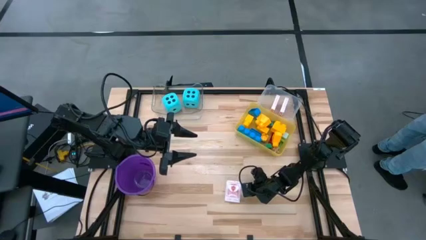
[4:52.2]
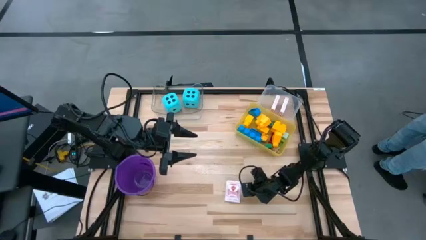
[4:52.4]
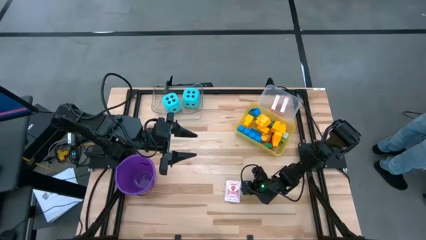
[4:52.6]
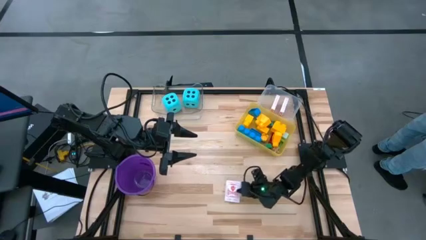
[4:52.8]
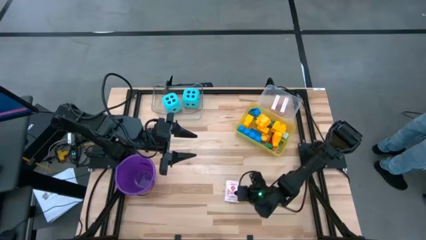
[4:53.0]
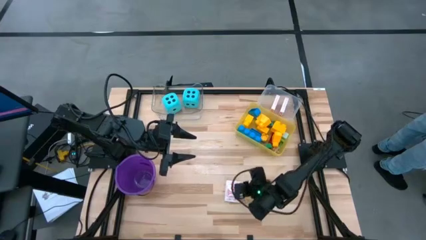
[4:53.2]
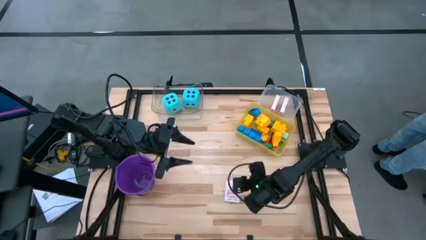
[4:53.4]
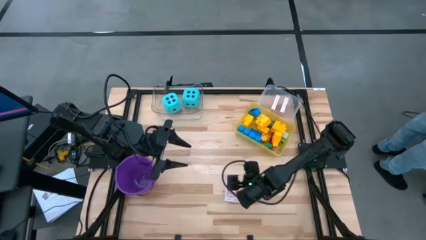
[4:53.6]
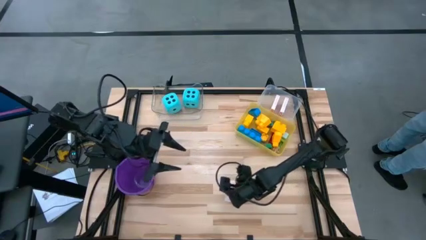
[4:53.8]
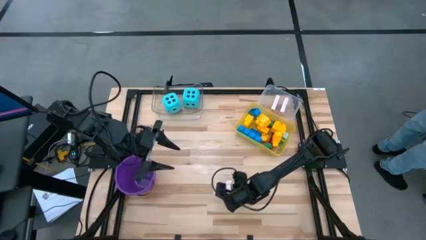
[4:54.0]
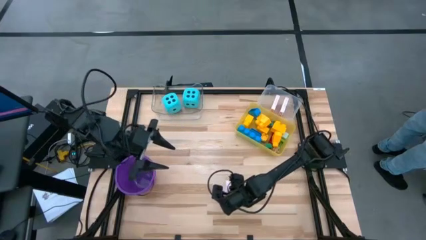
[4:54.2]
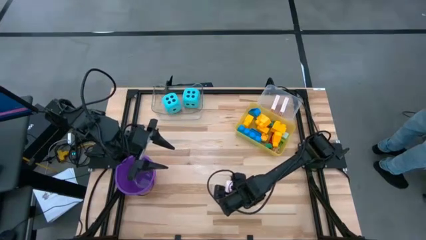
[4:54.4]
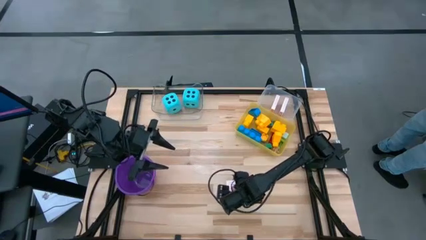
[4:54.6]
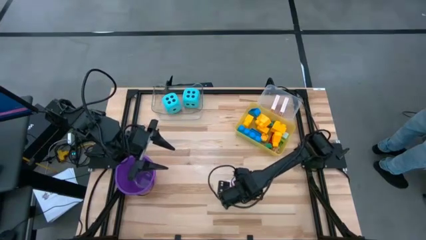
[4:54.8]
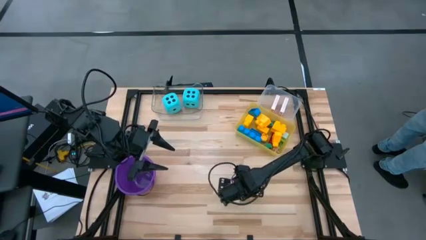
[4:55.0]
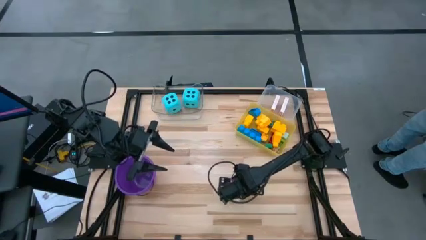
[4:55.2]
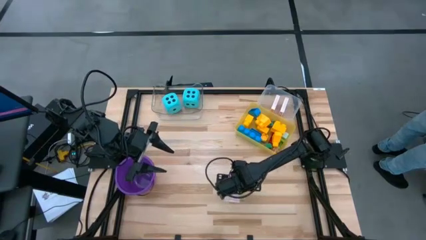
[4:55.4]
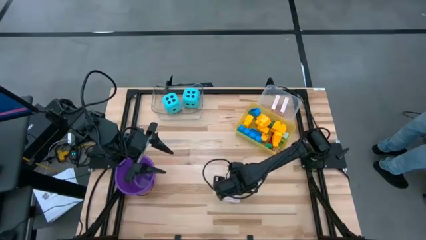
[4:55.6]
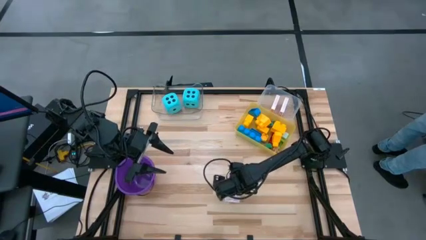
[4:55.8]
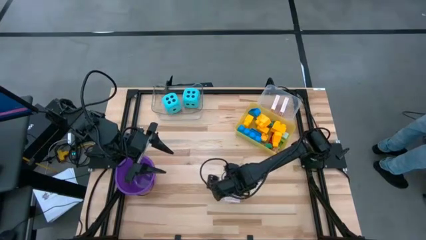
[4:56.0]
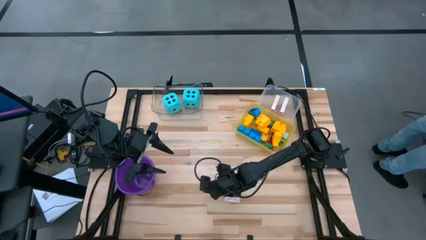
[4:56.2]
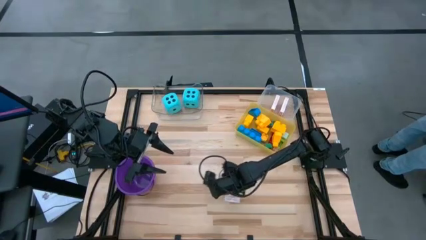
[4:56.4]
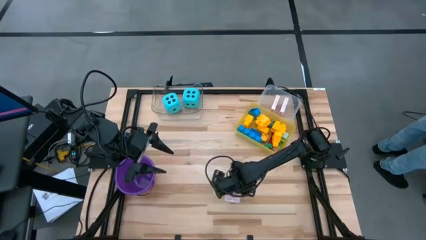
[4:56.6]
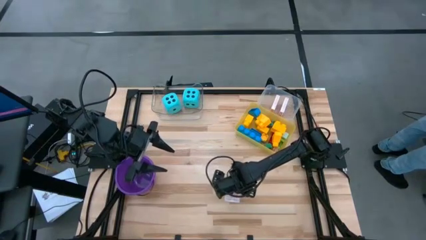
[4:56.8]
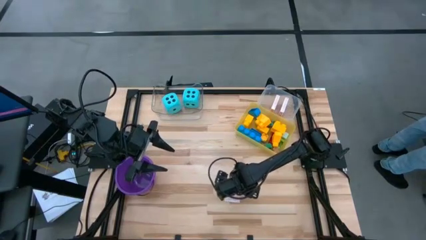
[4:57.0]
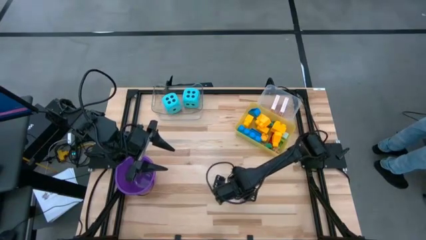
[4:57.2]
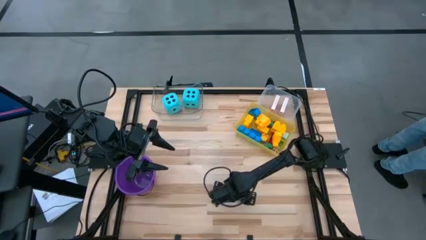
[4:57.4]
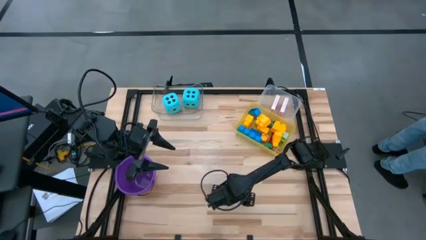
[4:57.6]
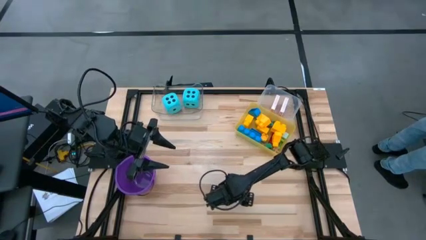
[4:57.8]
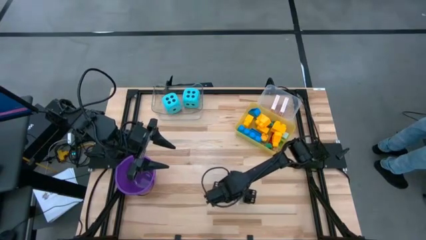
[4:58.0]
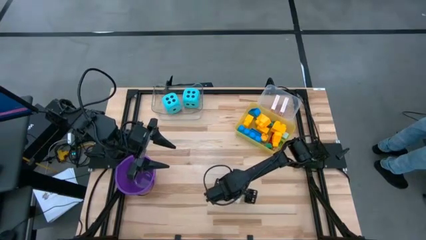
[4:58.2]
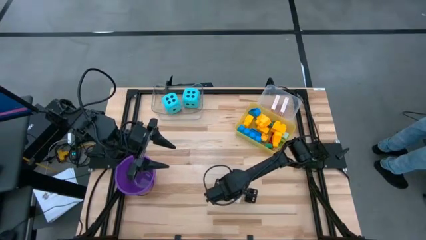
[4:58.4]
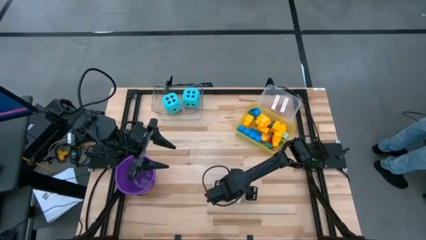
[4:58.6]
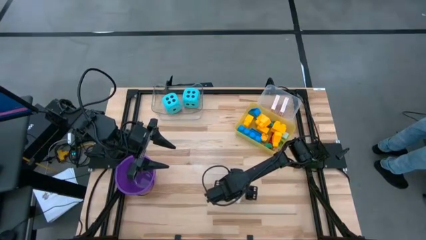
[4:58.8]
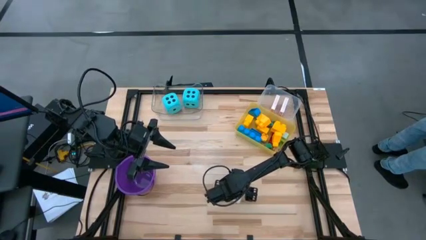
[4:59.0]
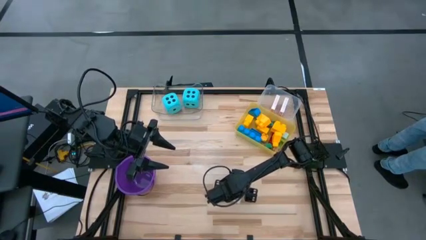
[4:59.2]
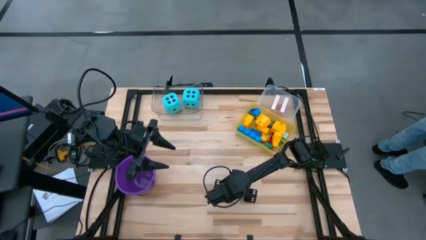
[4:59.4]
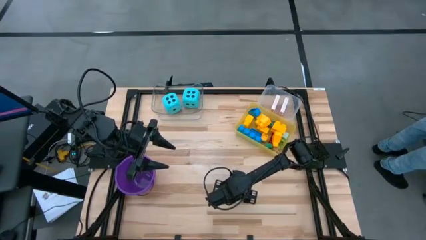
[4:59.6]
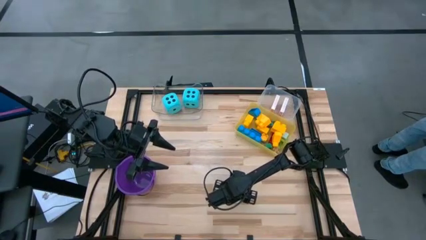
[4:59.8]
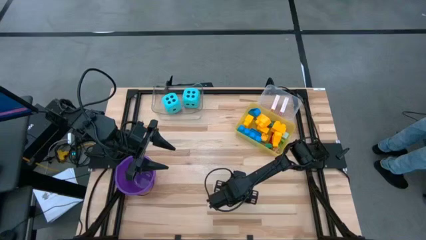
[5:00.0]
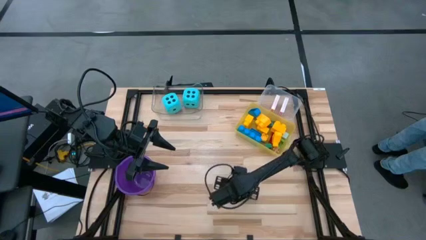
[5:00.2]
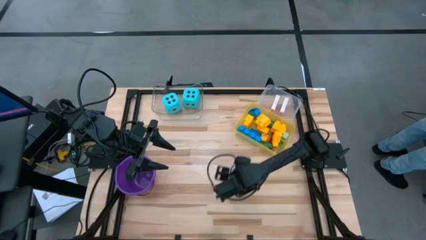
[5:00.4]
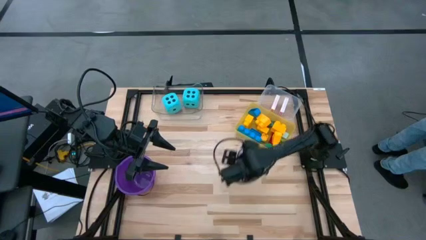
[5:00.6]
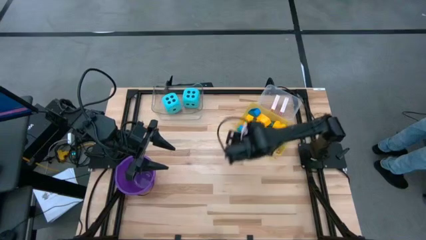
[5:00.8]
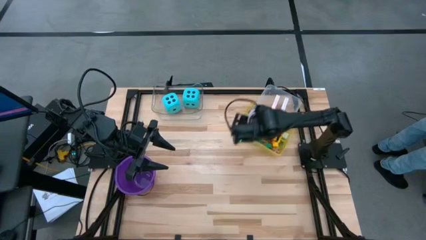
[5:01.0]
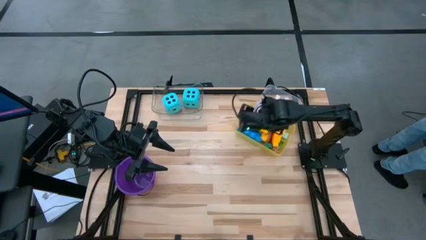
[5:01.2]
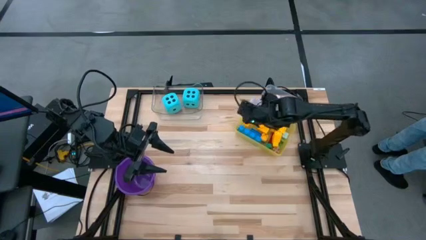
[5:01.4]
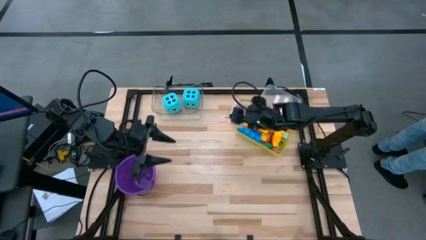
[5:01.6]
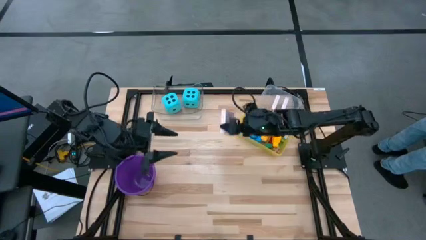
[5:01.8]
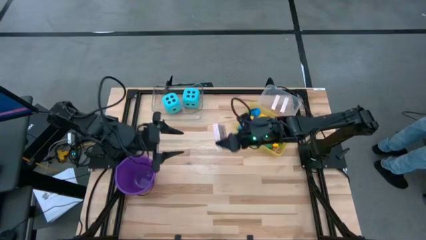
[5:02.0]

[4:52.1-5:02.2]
Task: Pick & Place Toys
Put the red deck of cards into the white bin
